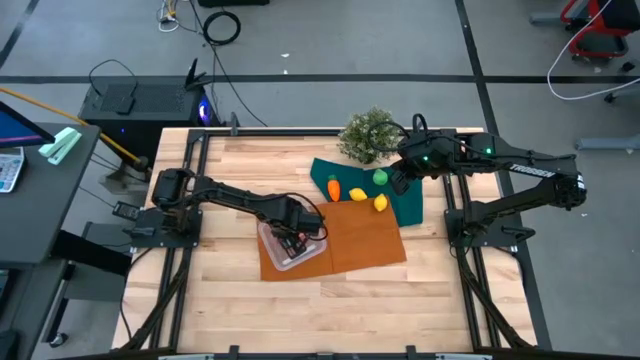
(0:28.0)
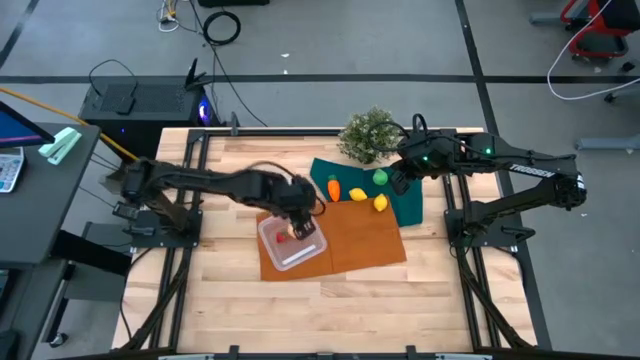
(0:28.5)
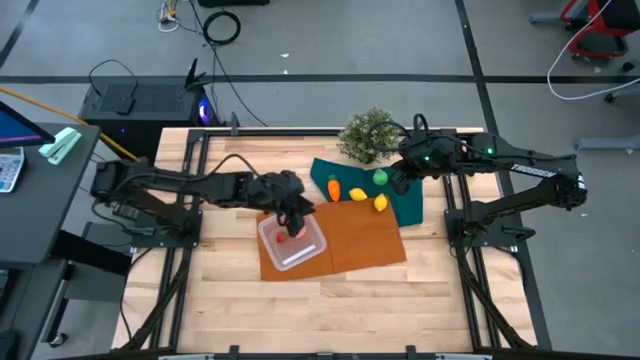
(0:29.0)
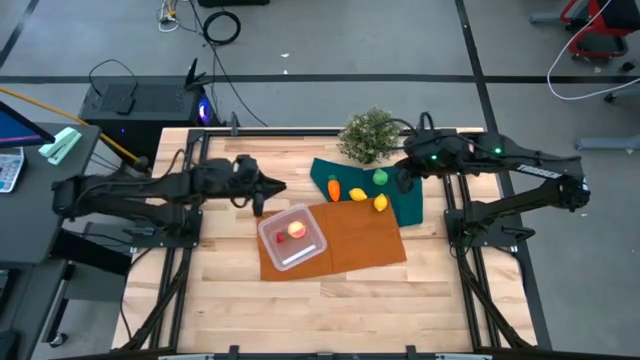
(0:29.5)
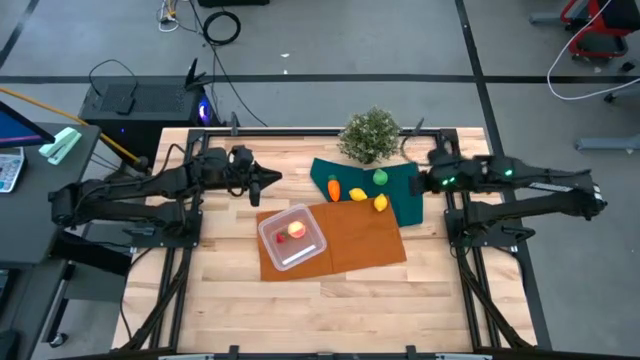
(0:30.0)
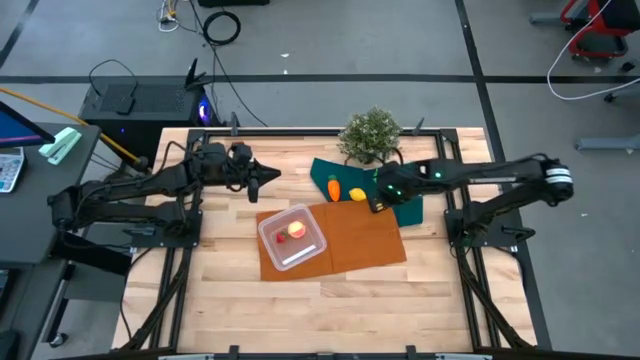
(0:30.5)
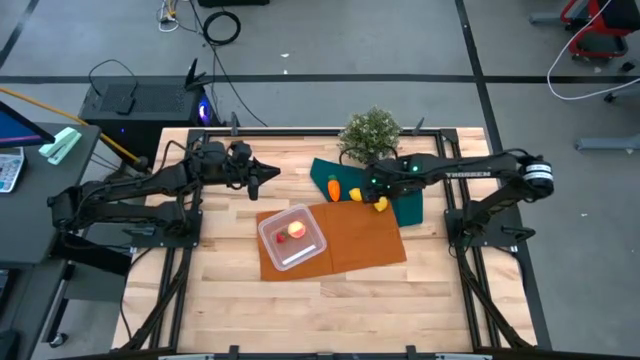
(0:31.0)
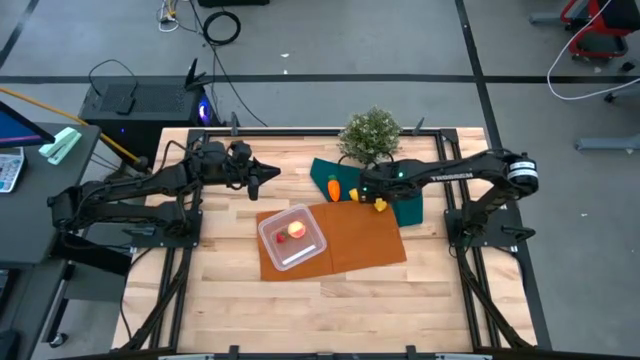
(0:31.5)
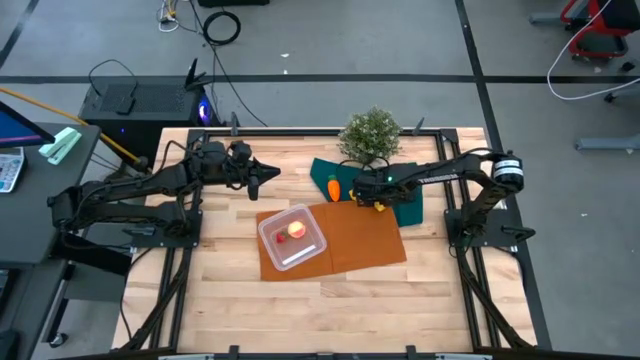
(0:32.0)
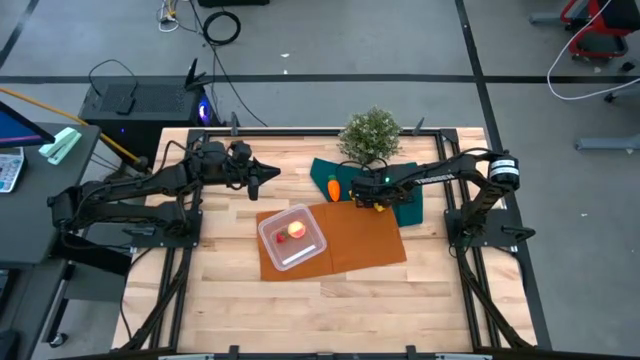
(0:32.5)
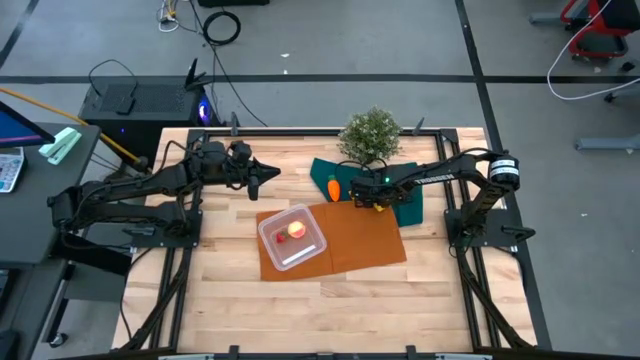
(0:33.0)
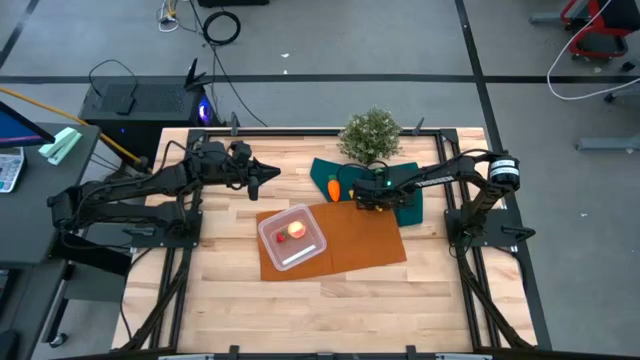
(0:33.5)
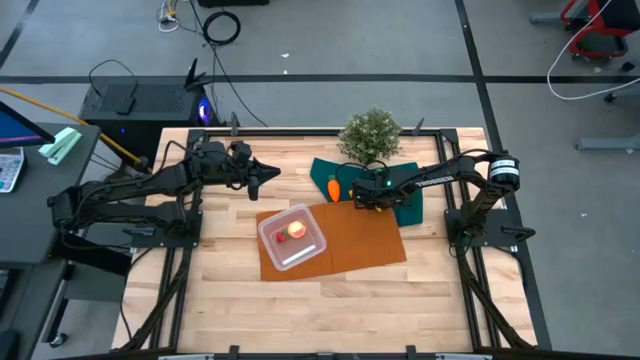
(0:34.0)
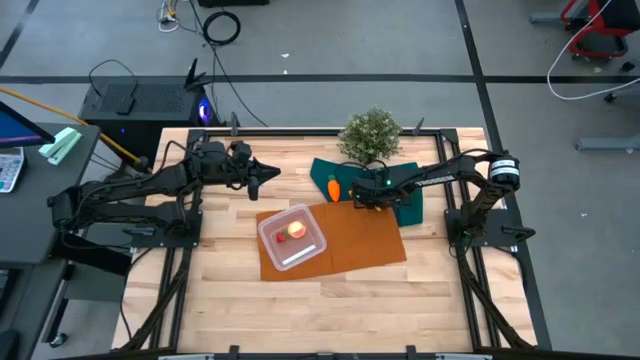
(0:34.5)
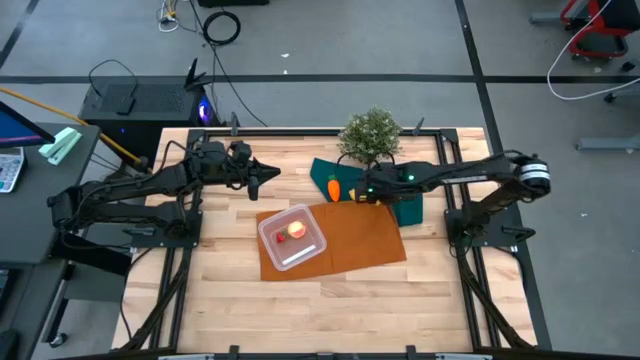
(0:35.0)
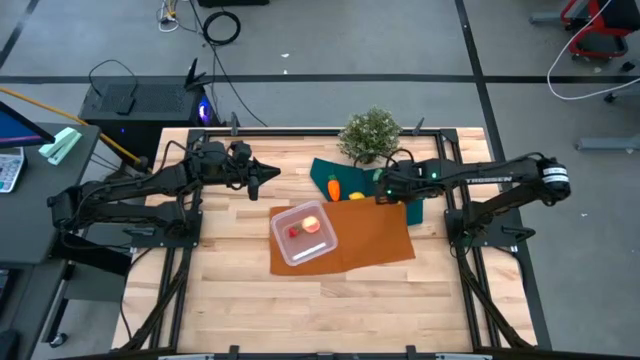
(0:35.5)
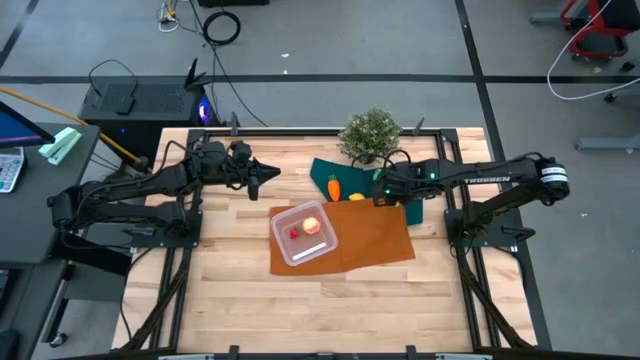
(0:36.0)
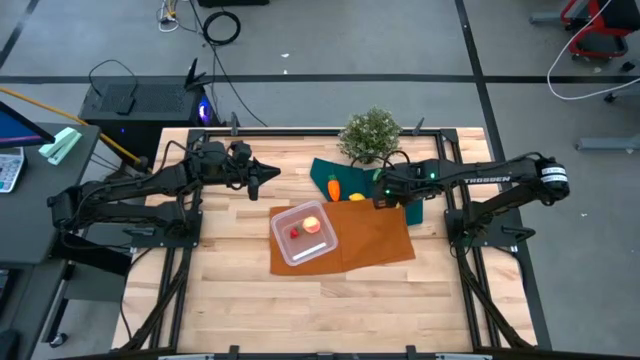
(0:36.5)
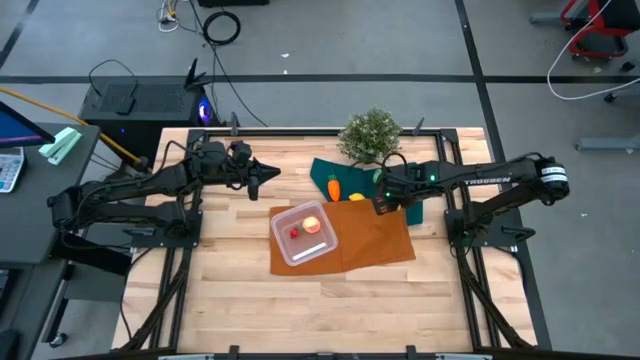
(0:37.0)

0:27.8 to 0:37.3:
Task: Pick and placing Produce into tupperware
Put the right yellow lemon into the transparent bin

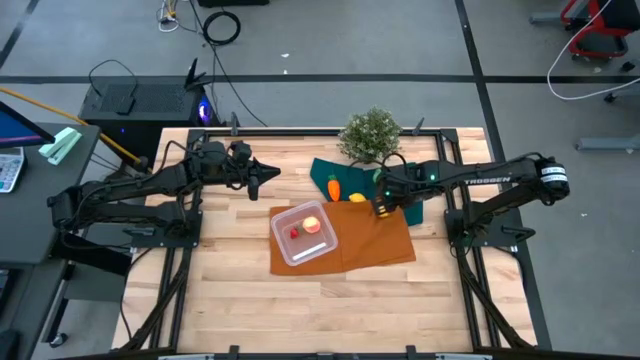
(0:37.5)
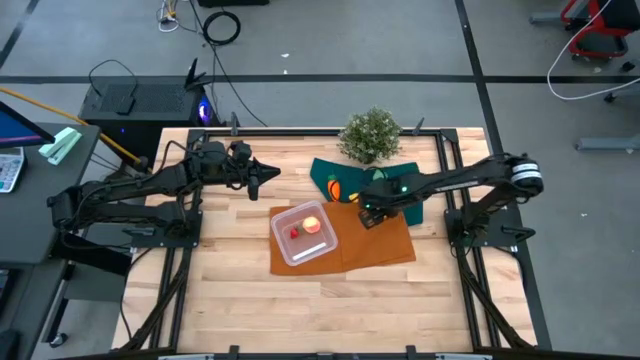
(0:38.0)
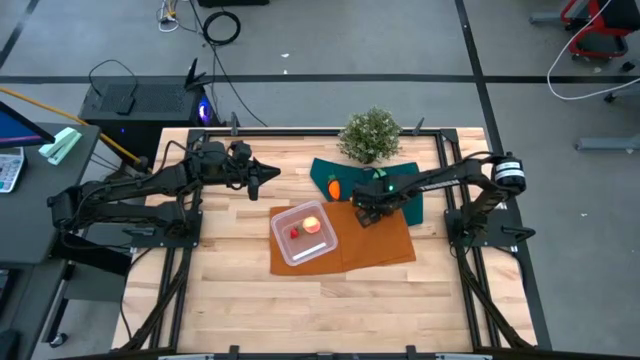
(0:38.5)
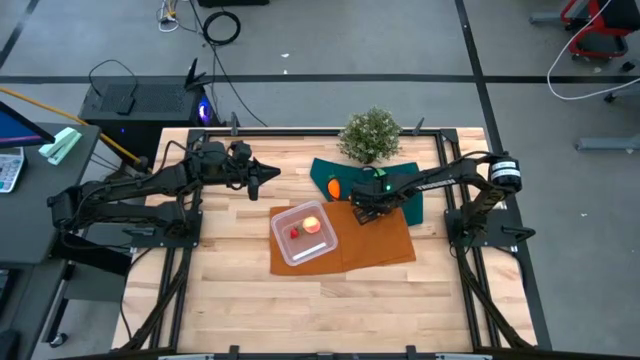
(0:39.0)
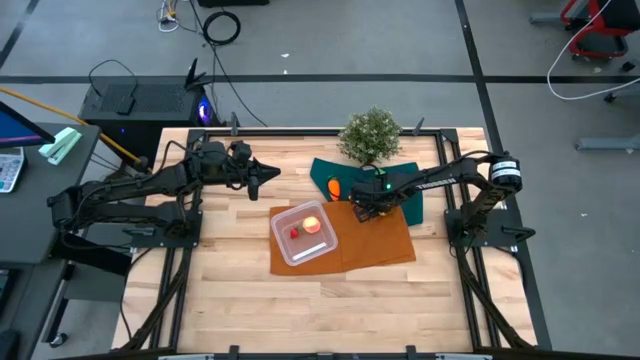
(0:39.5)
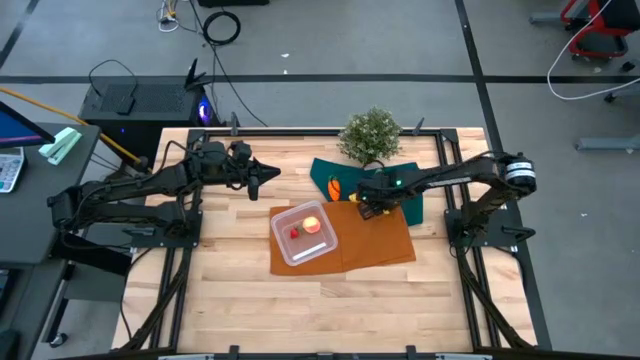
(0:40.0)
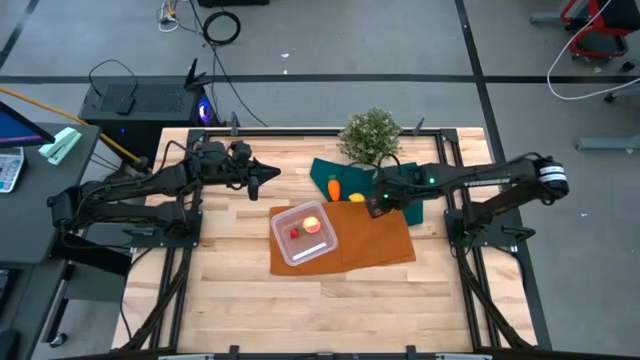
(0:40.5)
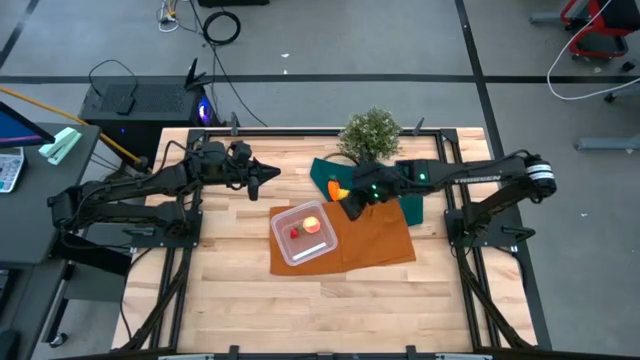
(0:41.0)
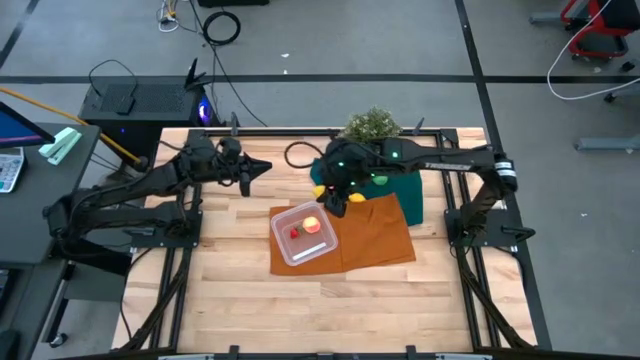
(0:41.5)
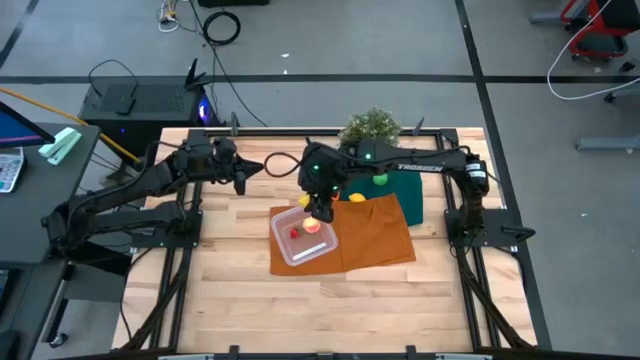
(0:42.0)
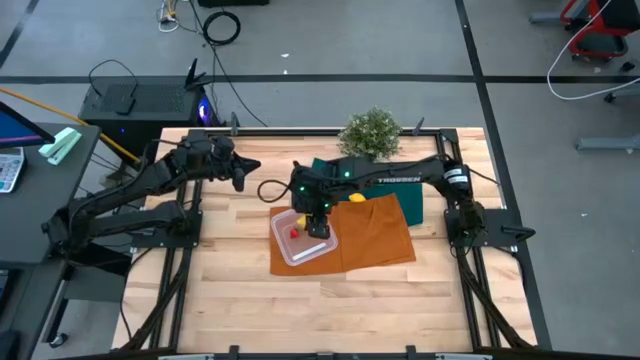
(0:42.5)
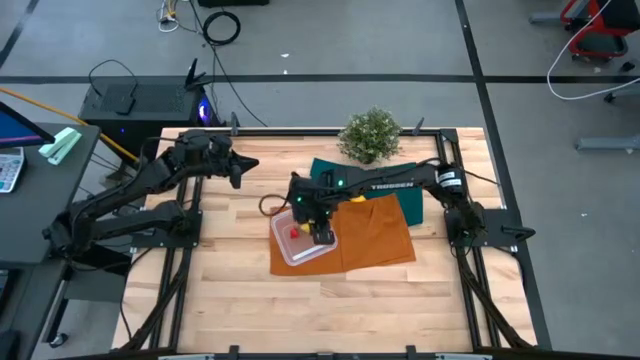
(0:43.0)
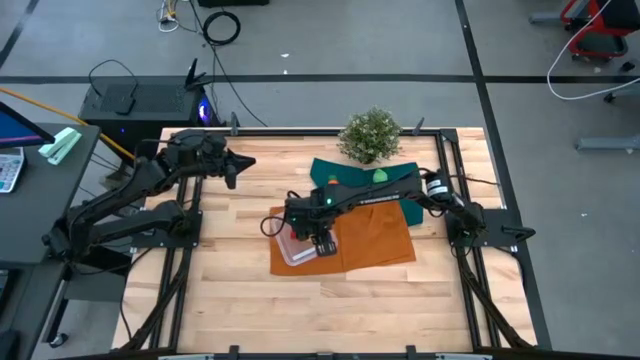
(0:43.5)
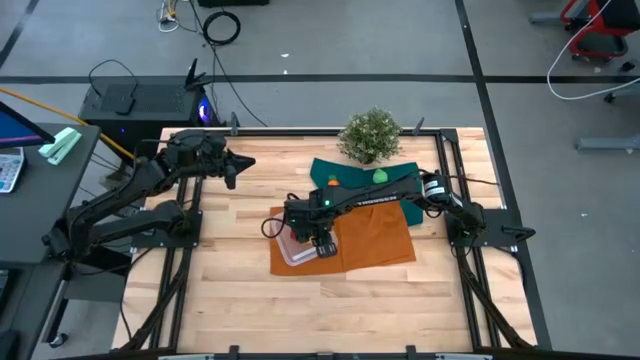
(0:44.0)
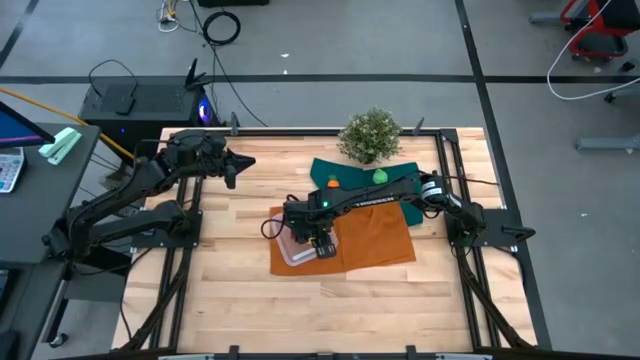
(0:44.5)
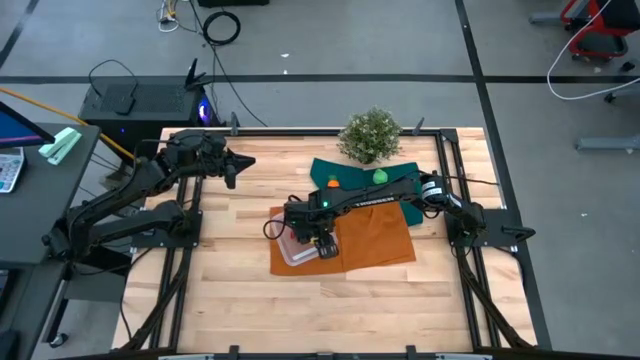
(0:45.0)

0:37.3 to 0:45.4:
Put the right yellow lemon into the transparent bin

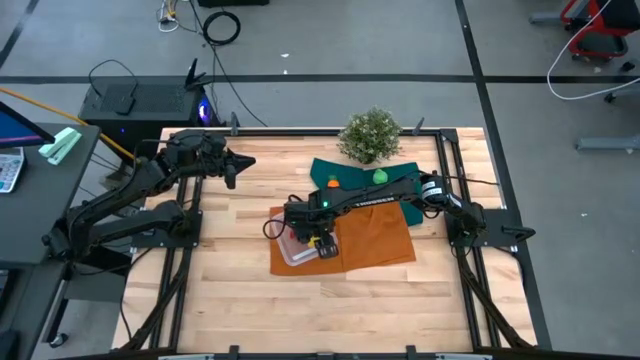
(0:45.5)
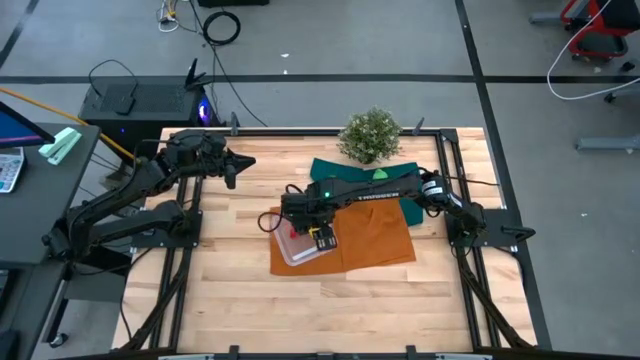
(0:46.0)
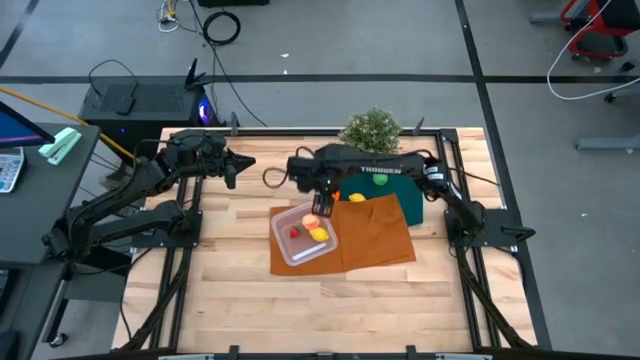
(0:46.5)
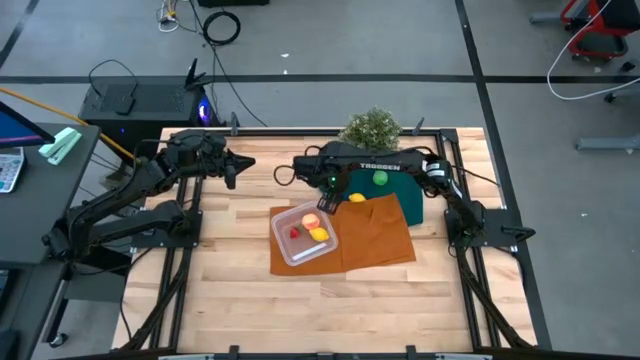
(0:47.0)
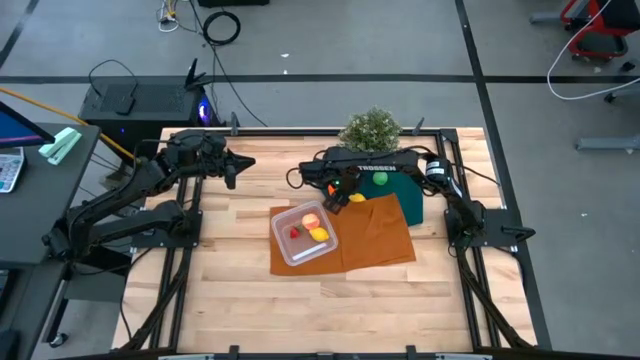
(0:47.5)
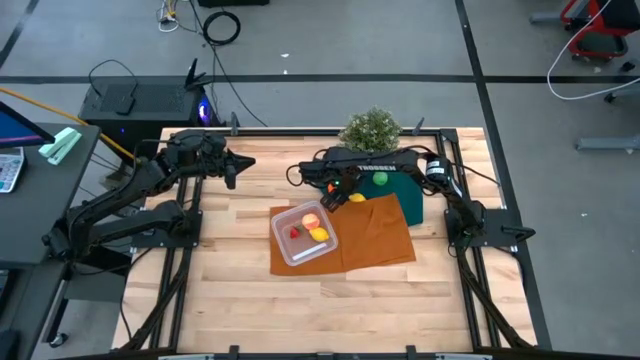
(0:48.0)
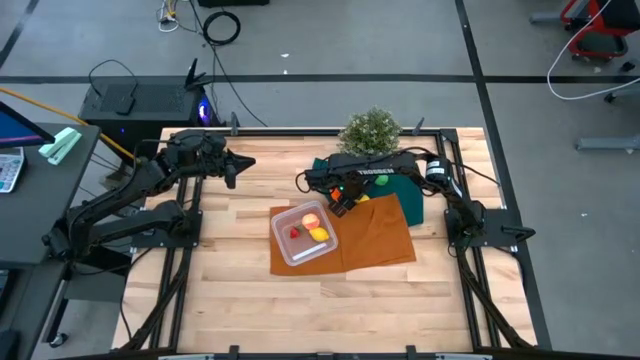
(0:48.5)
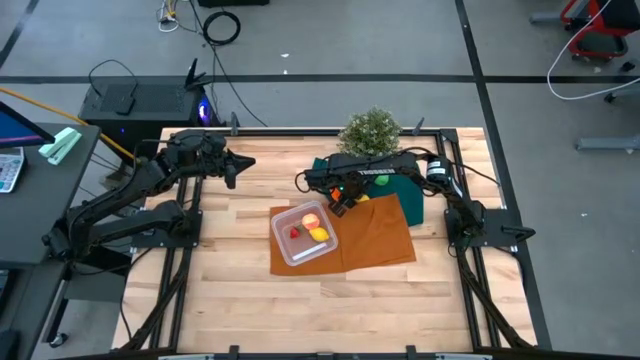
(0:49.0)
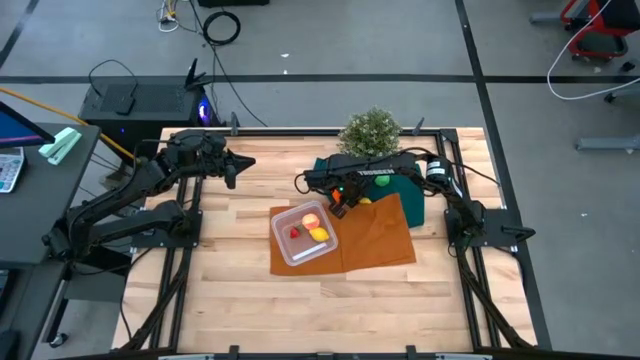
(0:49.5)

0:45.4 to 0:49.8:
Put the yellow lemon into the transparent bin
